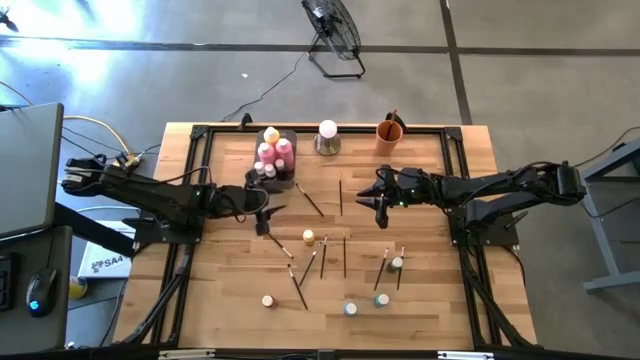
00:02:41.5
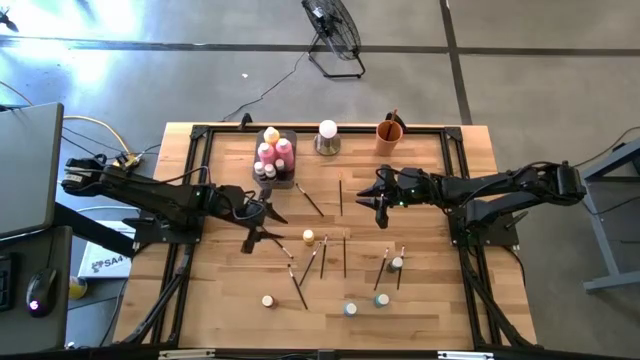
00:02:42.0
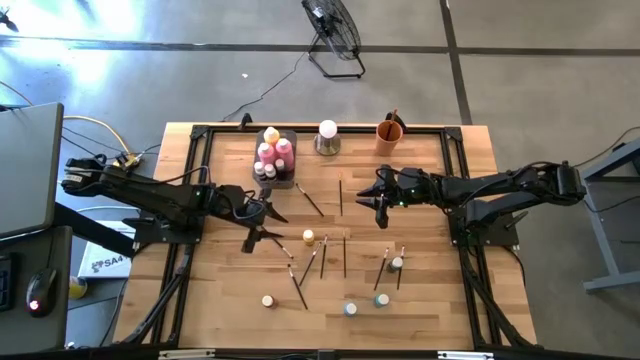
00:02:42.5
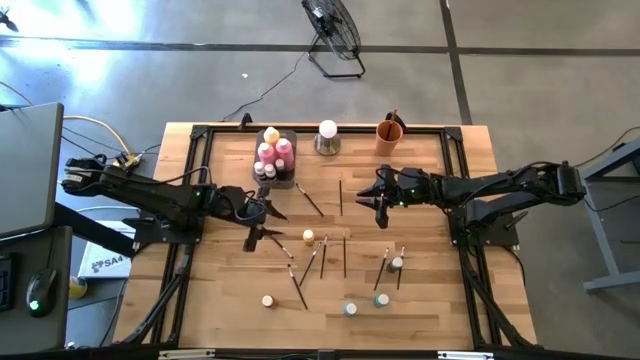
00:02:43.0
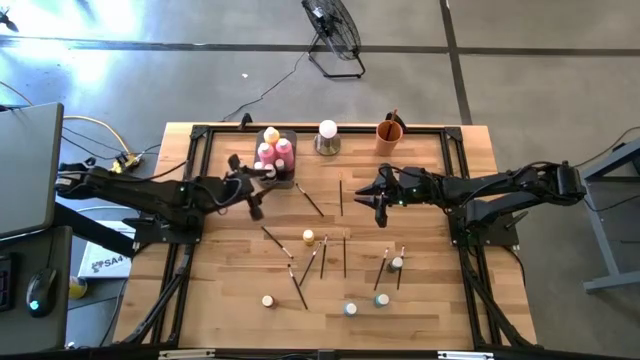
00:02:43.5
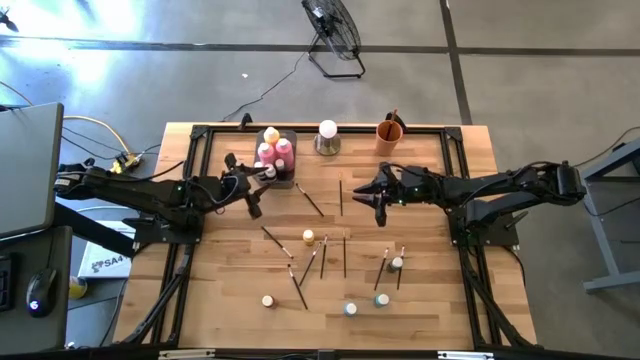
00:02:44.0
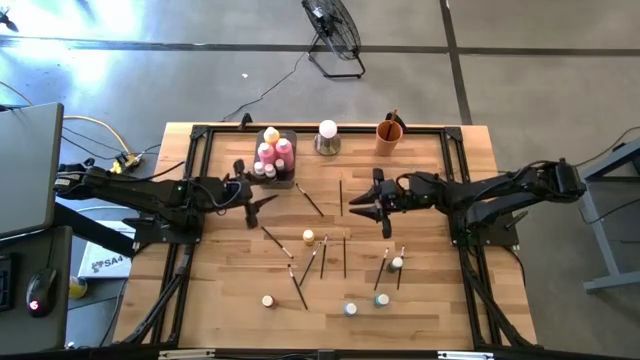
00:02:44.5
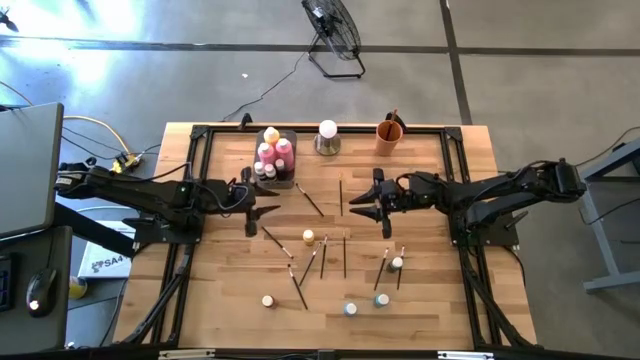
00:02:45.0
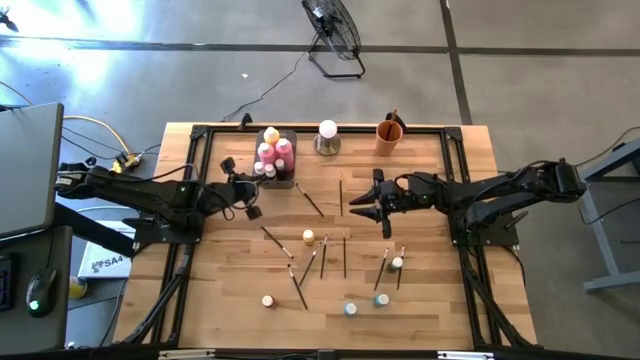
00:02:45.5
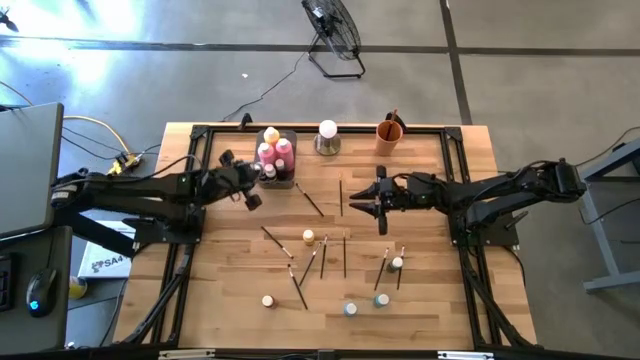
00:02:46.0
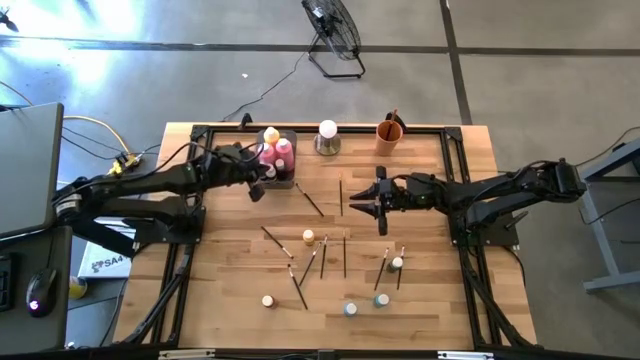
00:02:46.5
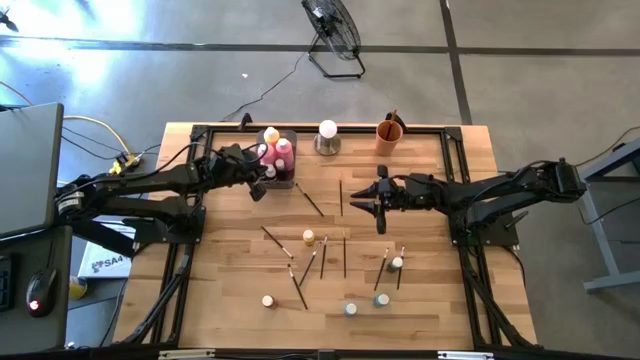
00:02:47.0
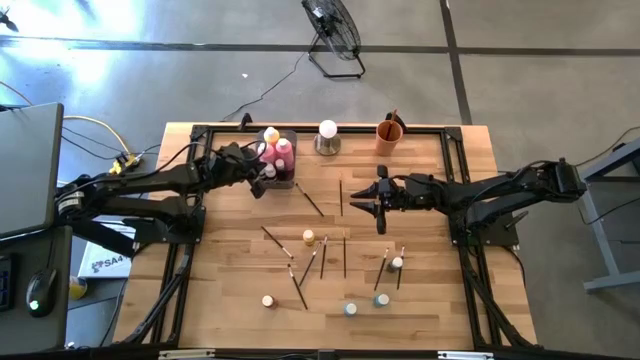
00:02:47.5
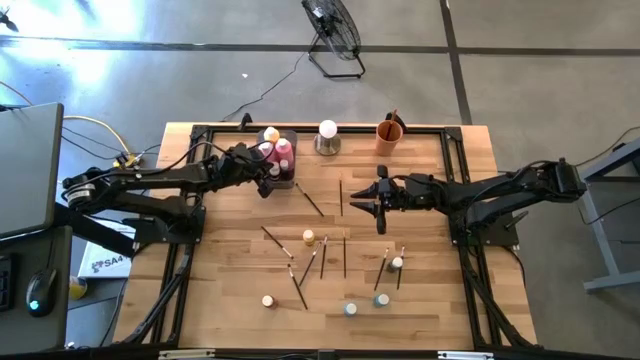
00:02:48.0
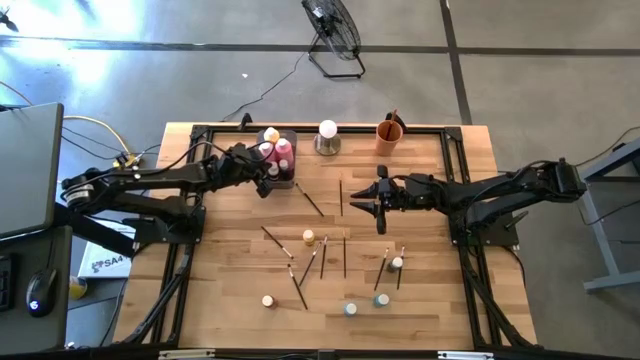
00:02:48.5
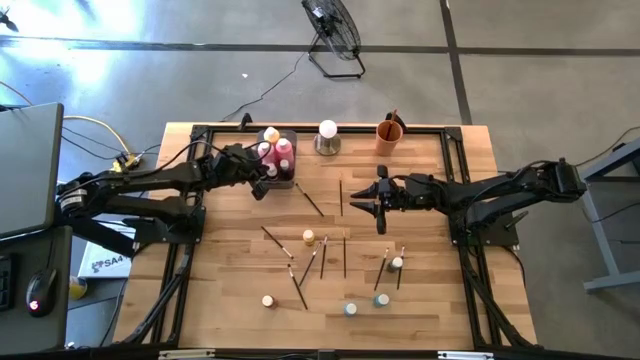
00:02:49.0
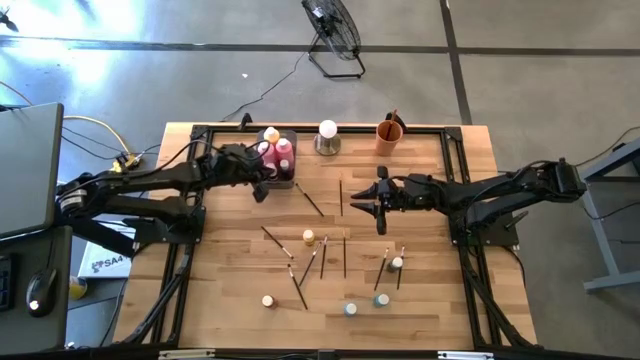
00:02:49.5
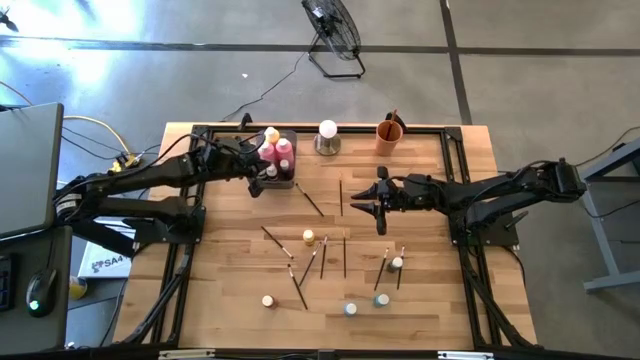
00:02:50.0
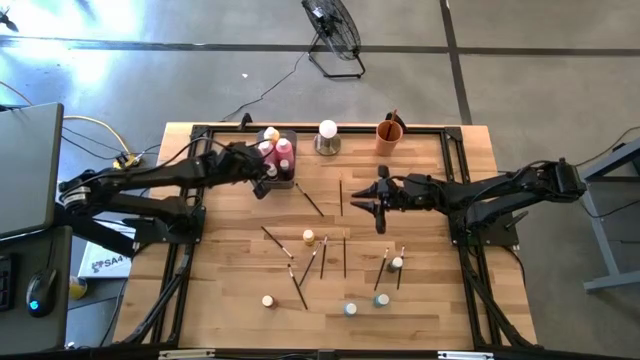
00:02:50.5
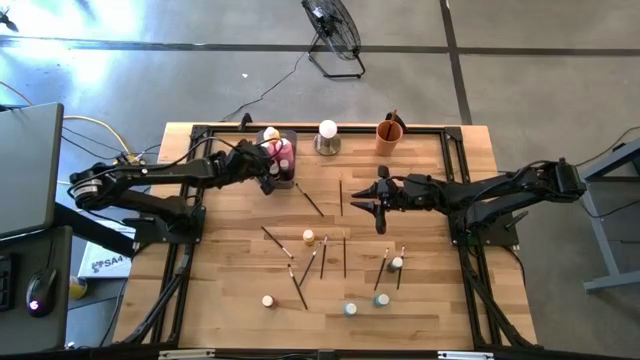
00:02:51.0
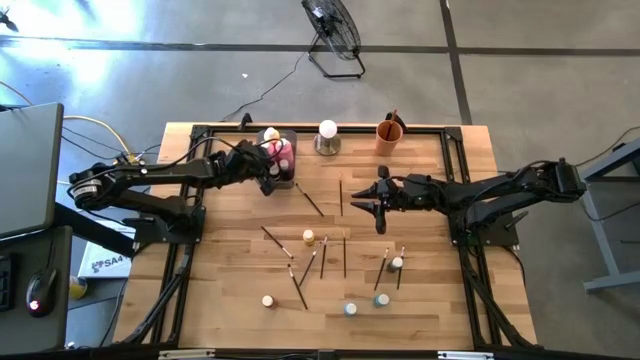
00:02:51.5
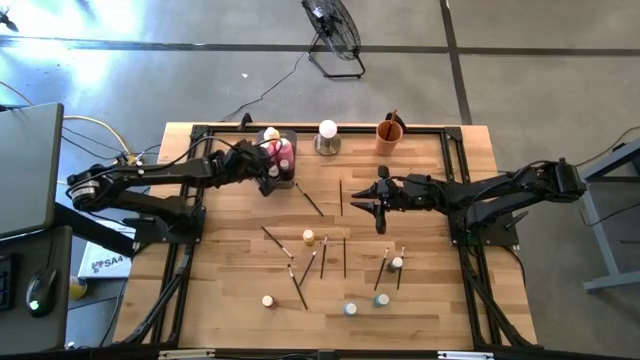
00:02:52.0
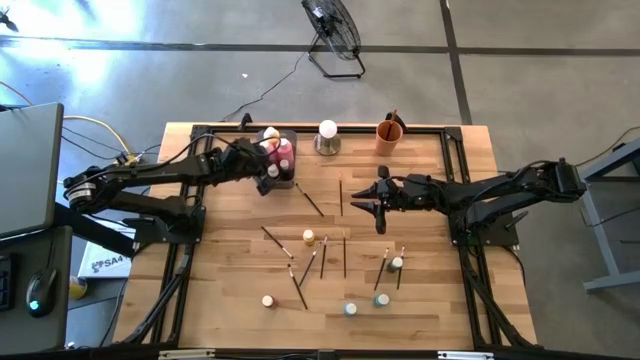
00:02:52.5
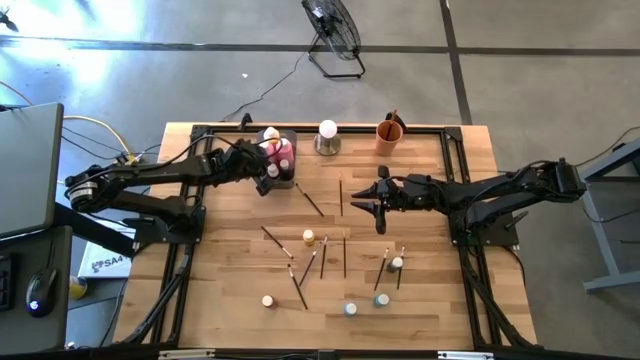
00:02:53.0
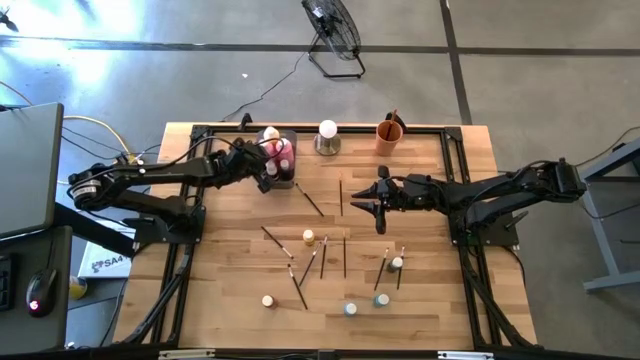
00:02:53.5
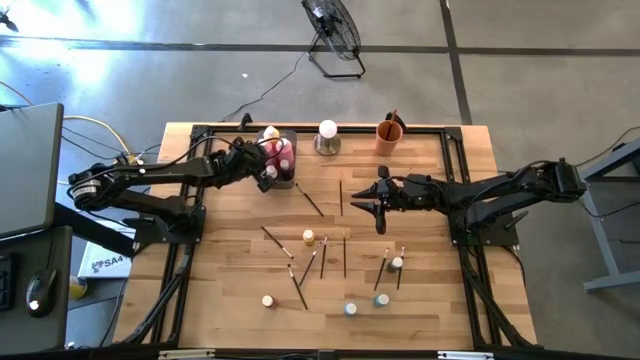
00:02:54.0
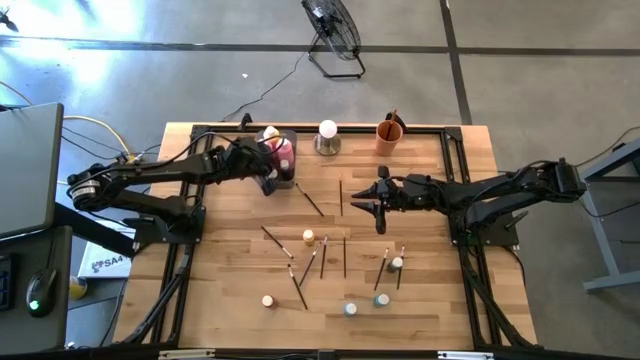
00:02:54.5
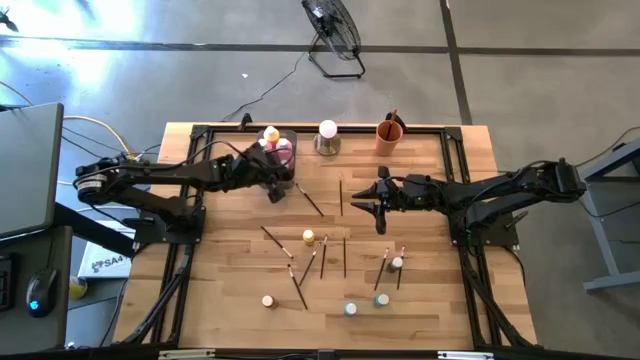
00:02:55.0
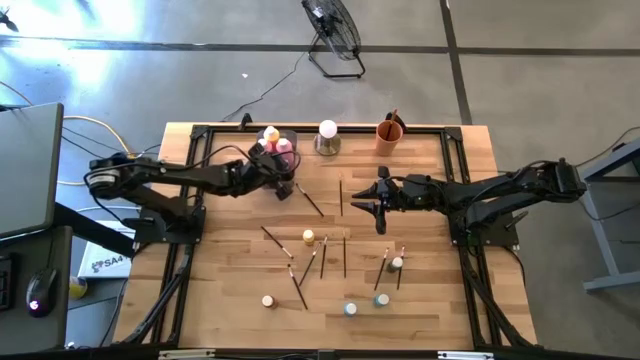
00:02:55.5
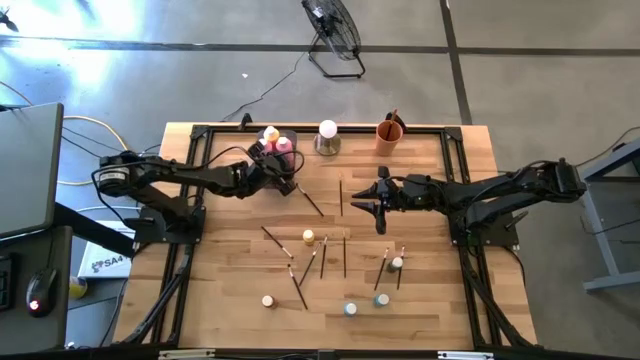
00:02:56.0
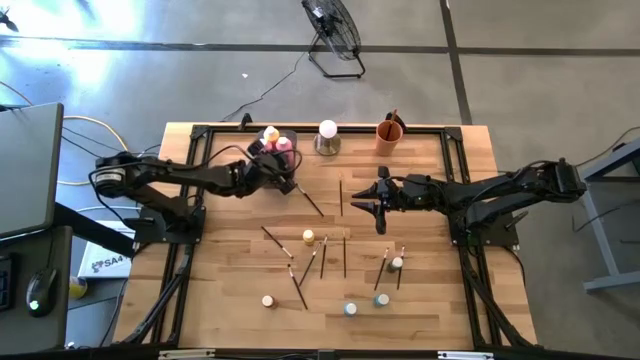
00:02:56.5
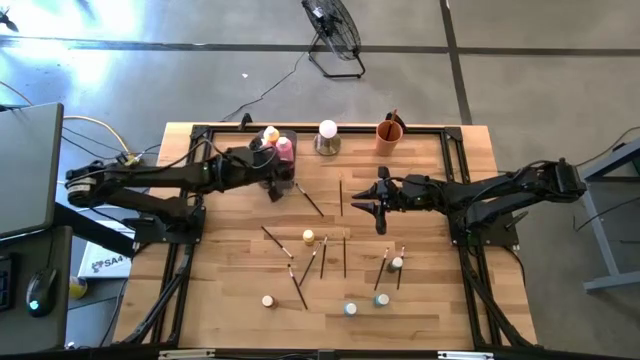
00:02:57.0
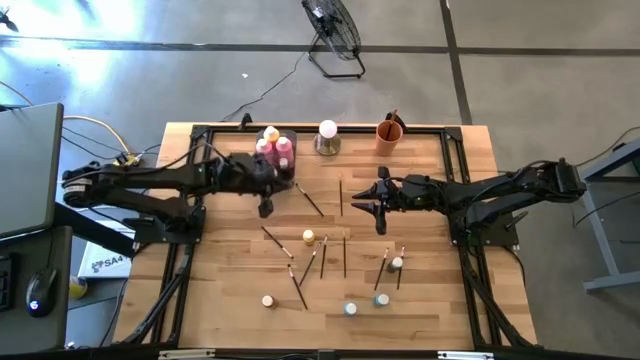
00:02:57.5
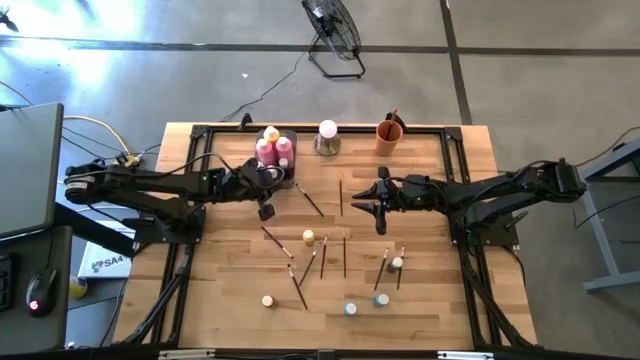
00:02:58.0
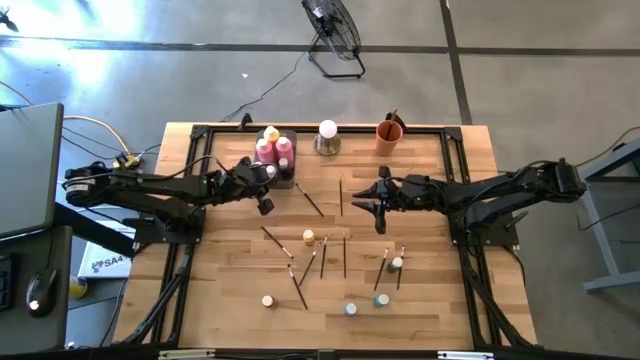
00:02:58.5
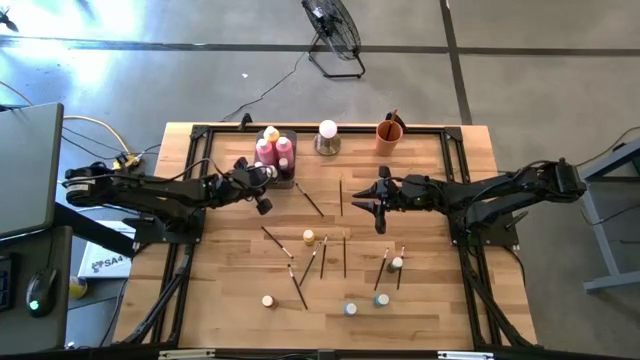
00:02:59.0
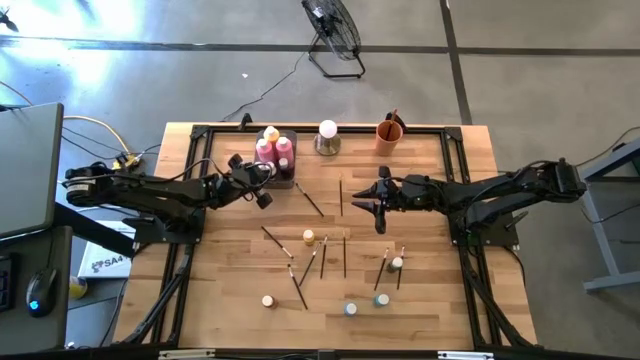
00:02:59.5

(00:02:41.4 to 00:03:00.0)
Task: Pick & Place Paint Supplies
Put the small blue paint bottle into the gray bin

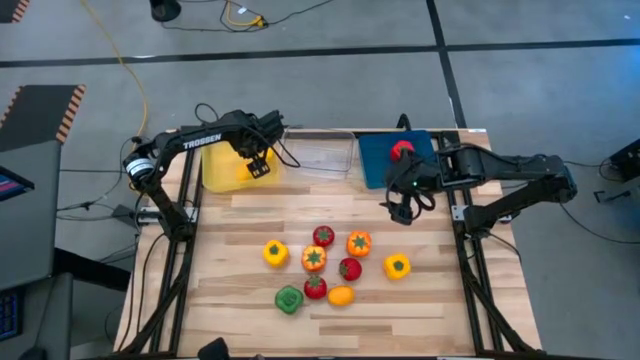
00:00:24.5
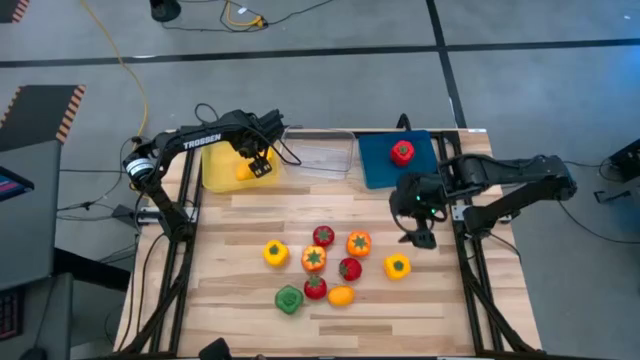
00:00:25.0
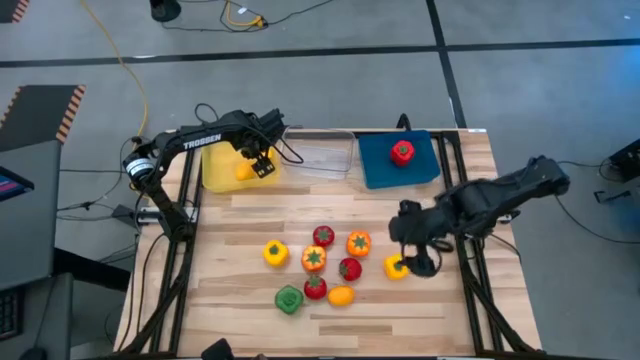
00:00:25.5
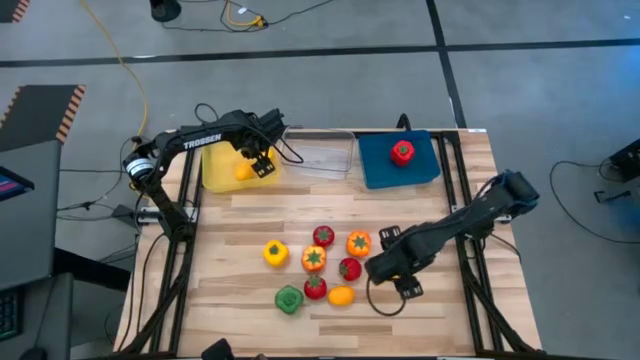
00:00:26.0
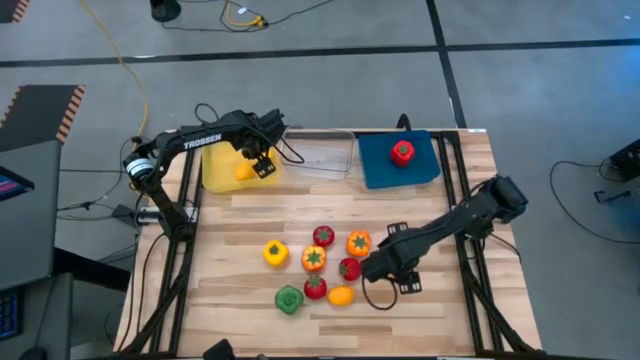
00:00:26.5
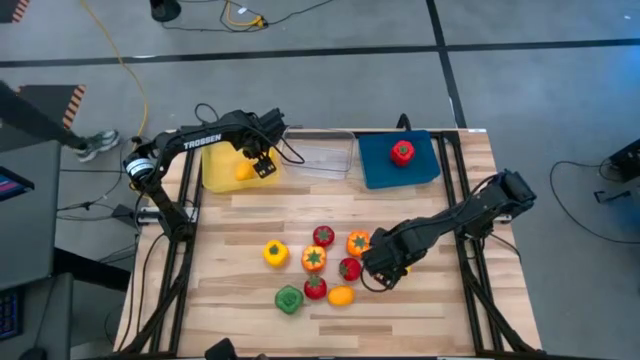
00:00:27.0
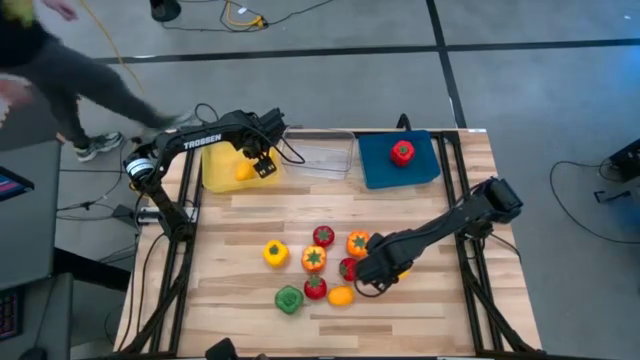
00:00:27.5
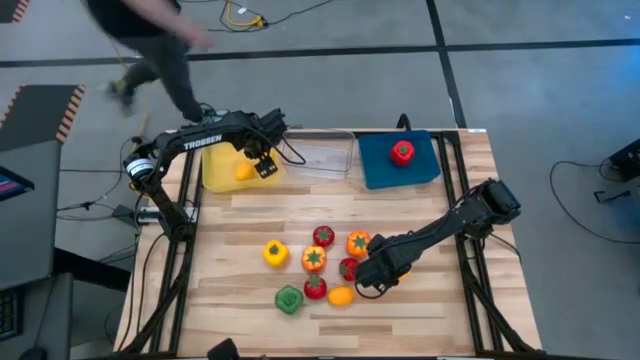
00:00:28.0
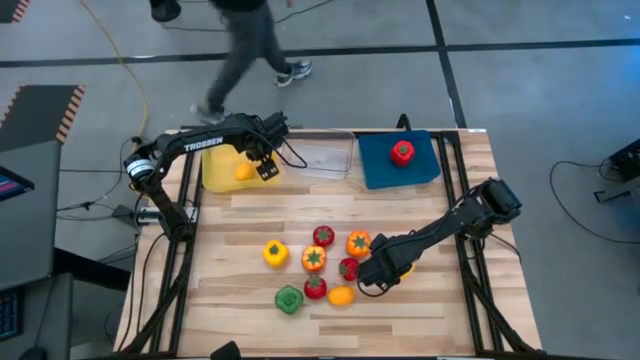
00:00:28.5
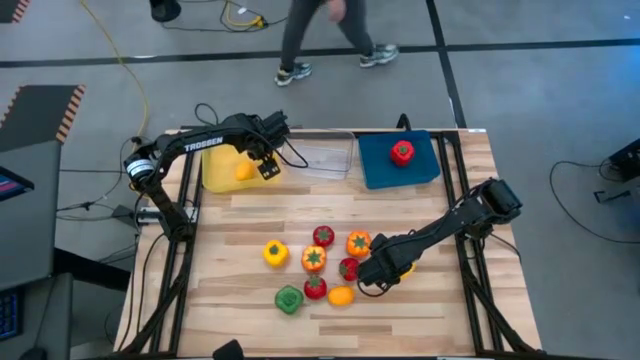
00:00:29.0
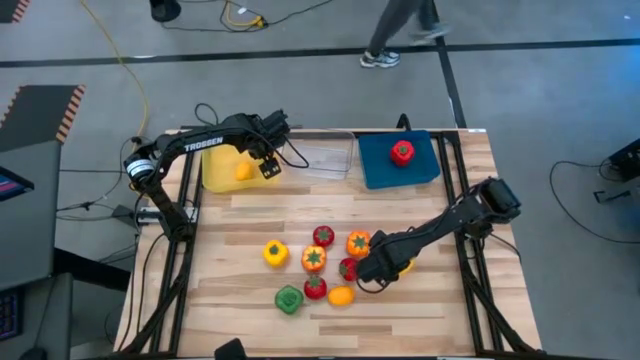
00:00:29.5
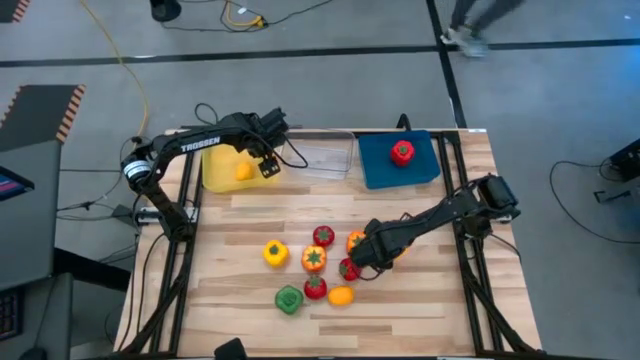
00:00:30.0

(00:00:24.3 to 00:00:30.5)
Task: Sort produce into baskets
Put the right yellow bell pepper into the blue bin
